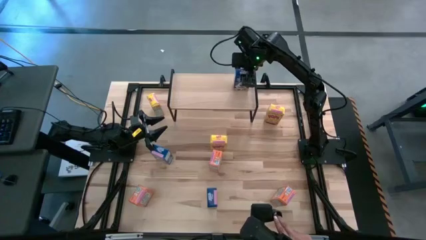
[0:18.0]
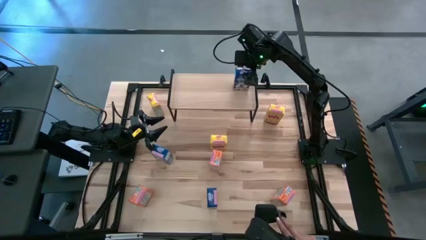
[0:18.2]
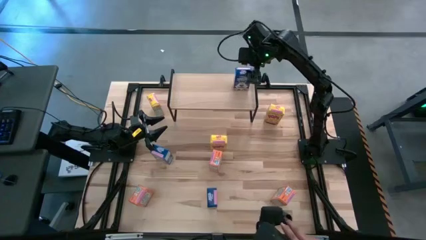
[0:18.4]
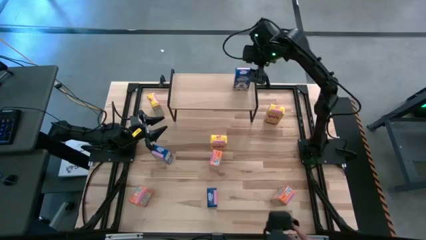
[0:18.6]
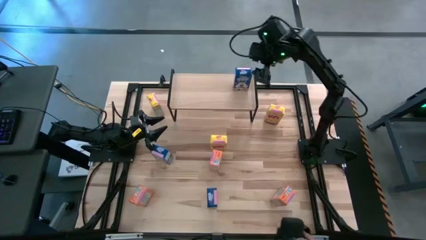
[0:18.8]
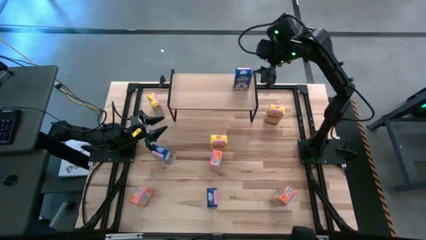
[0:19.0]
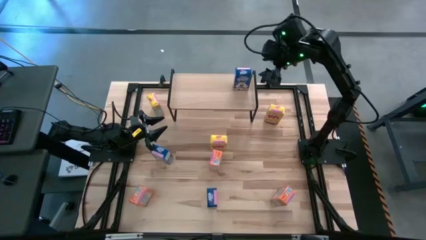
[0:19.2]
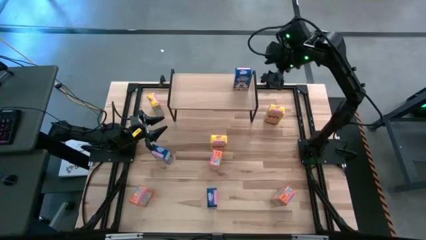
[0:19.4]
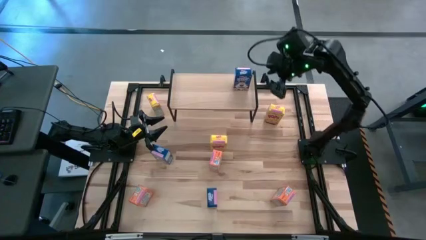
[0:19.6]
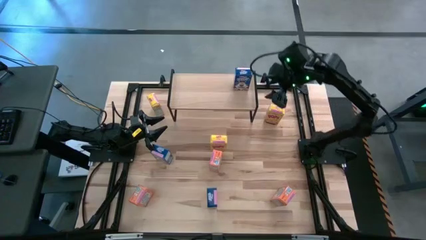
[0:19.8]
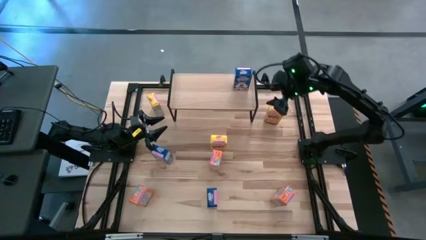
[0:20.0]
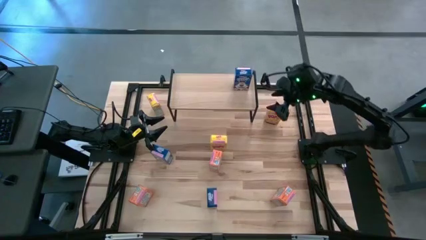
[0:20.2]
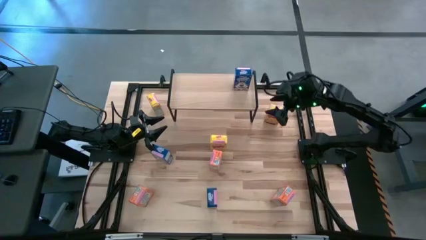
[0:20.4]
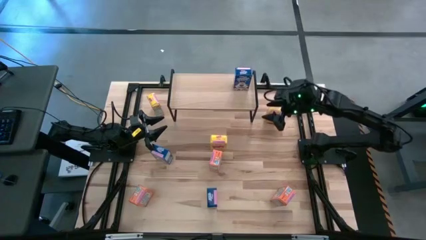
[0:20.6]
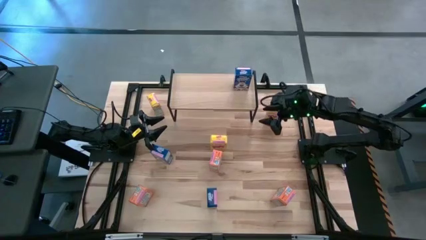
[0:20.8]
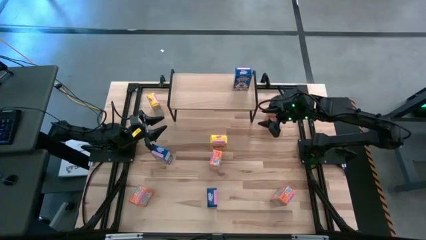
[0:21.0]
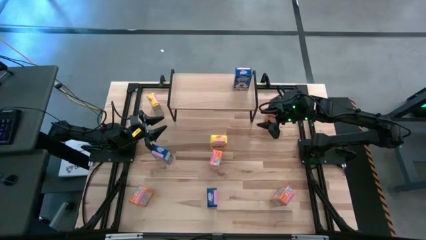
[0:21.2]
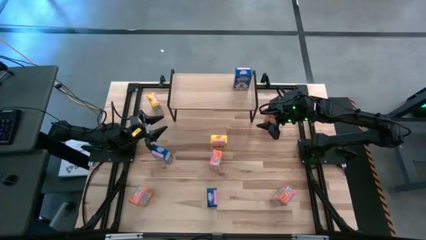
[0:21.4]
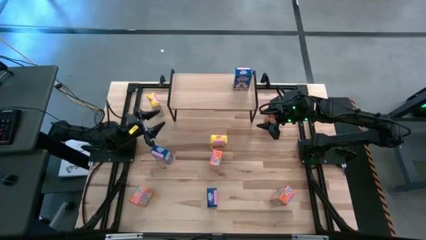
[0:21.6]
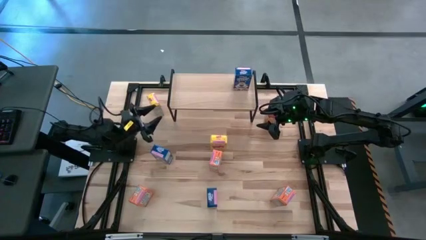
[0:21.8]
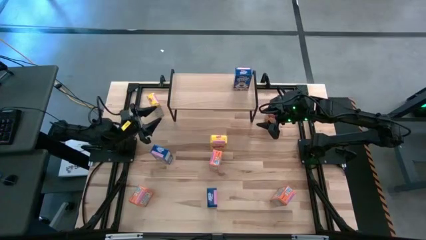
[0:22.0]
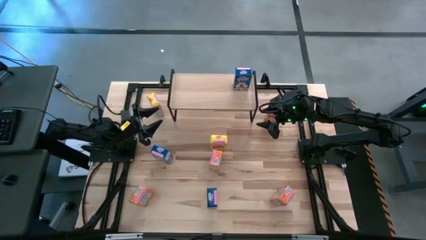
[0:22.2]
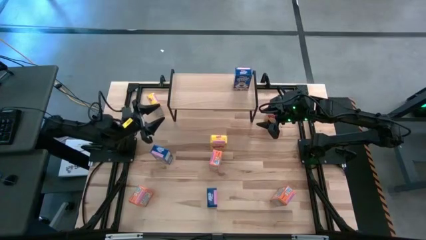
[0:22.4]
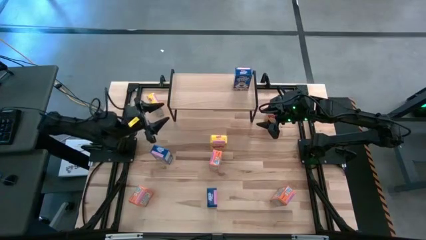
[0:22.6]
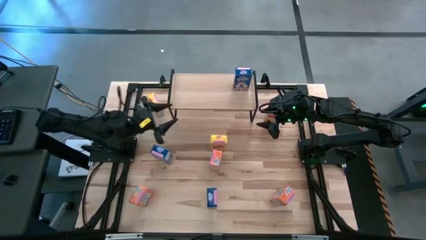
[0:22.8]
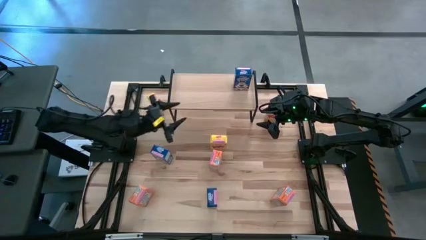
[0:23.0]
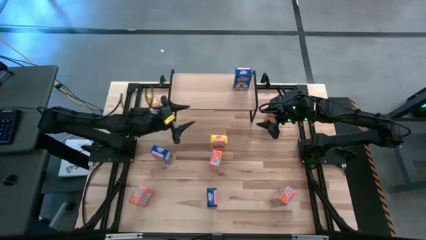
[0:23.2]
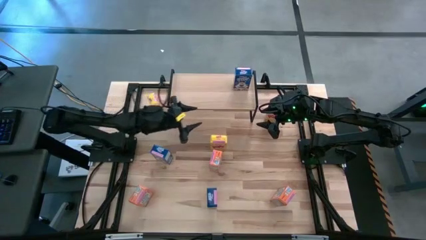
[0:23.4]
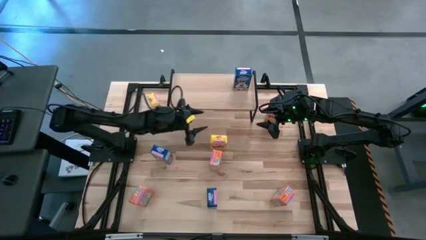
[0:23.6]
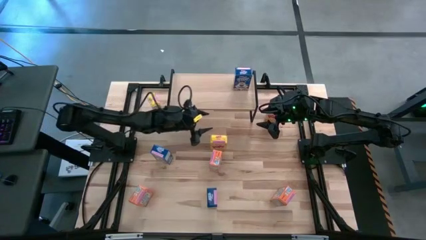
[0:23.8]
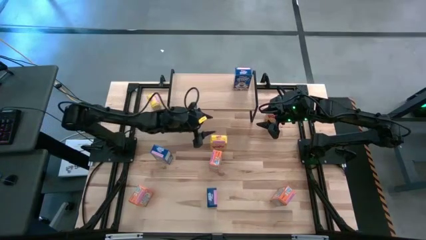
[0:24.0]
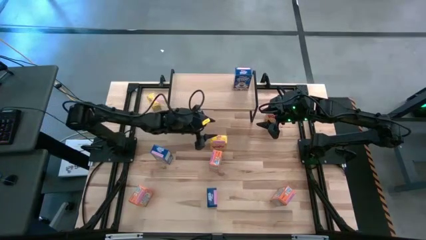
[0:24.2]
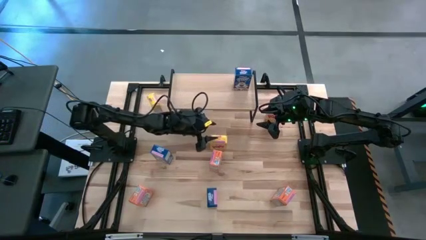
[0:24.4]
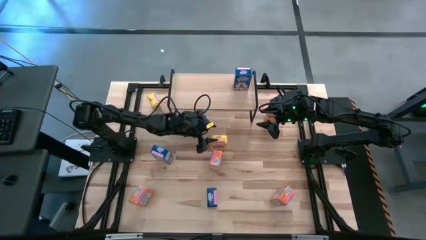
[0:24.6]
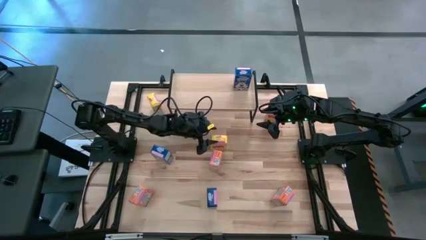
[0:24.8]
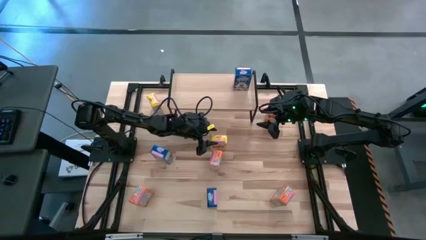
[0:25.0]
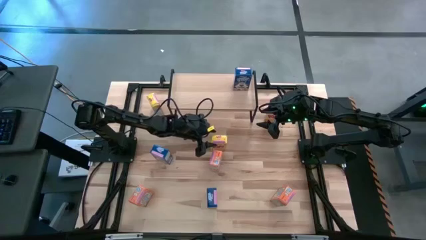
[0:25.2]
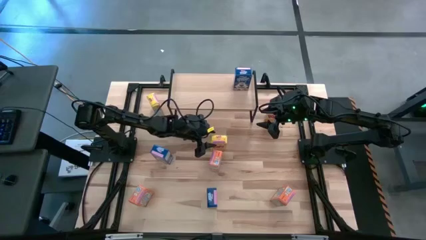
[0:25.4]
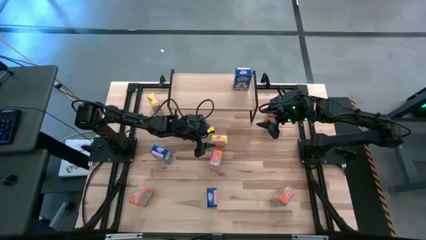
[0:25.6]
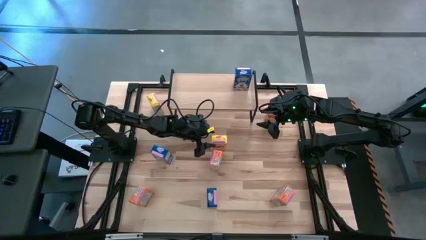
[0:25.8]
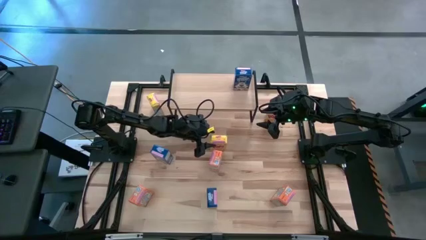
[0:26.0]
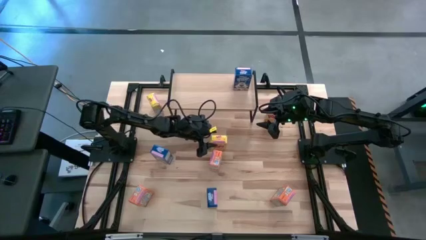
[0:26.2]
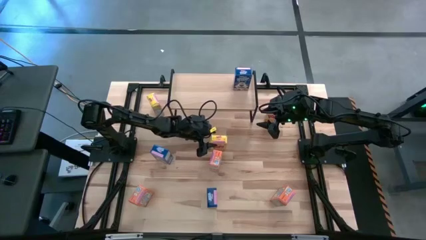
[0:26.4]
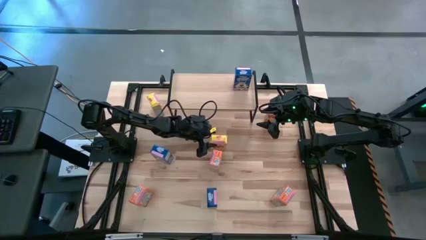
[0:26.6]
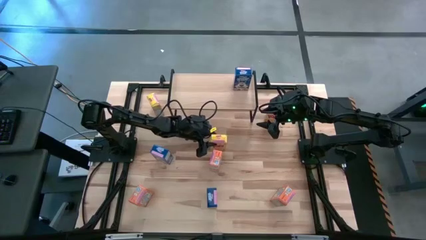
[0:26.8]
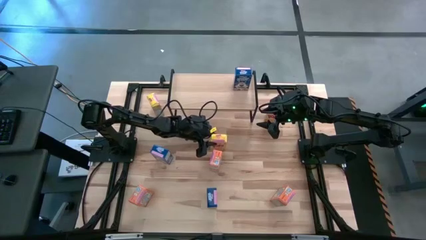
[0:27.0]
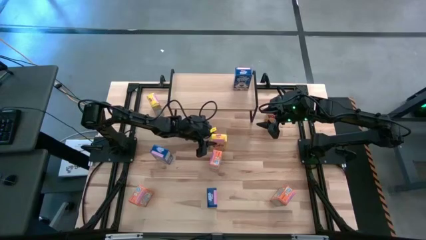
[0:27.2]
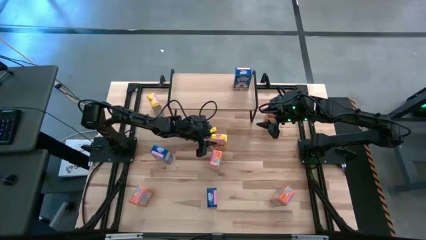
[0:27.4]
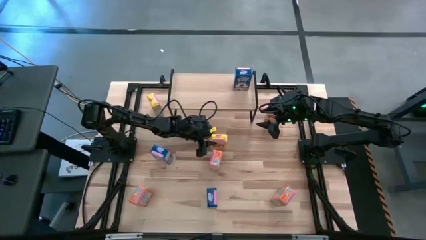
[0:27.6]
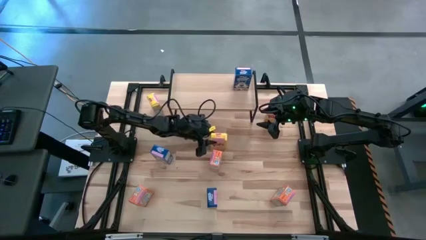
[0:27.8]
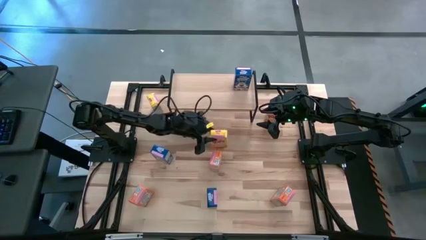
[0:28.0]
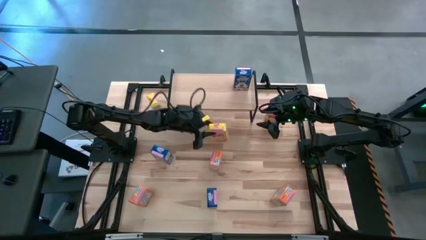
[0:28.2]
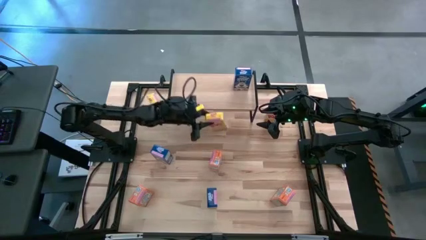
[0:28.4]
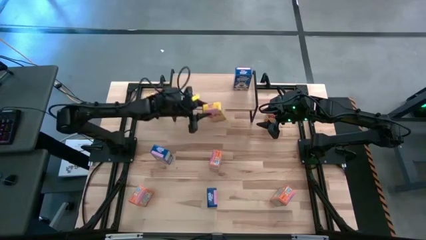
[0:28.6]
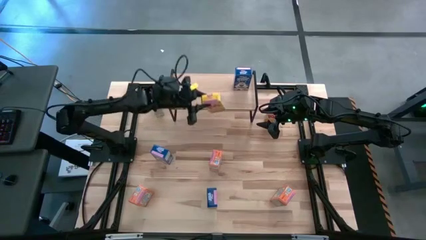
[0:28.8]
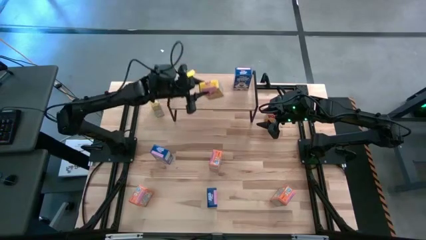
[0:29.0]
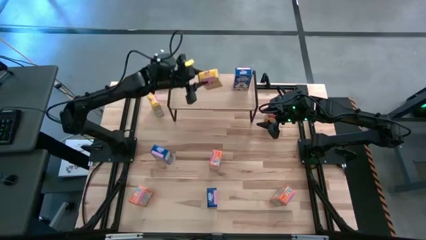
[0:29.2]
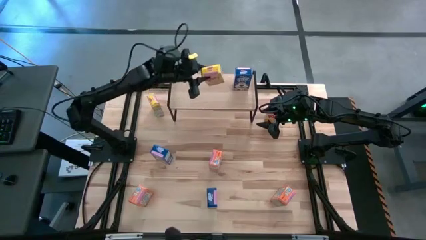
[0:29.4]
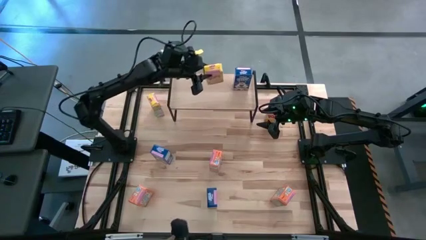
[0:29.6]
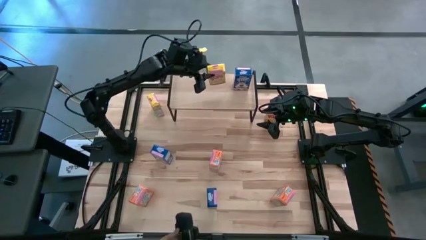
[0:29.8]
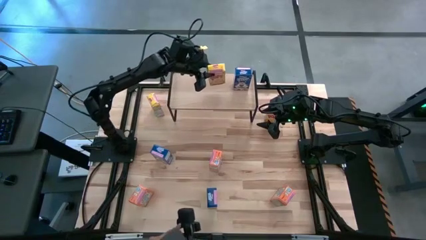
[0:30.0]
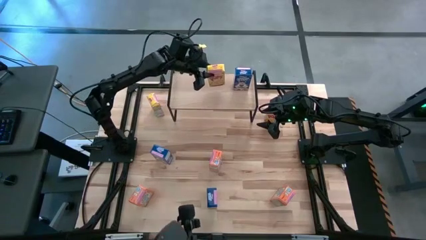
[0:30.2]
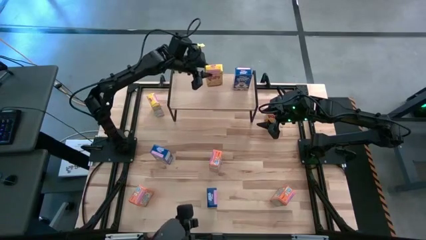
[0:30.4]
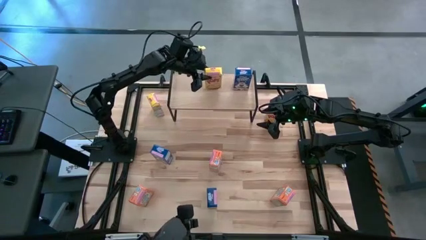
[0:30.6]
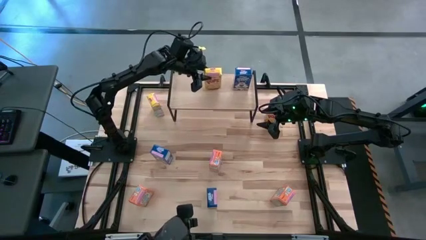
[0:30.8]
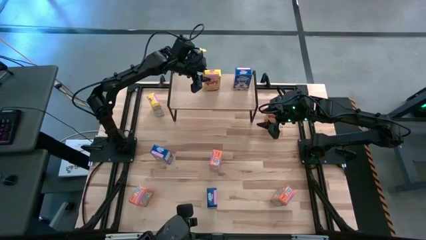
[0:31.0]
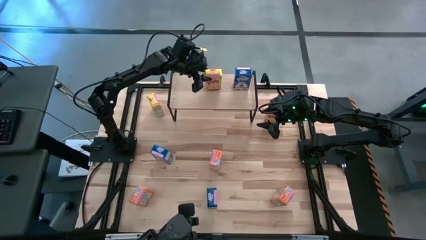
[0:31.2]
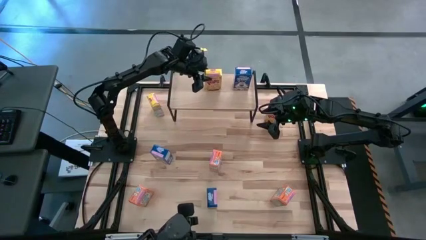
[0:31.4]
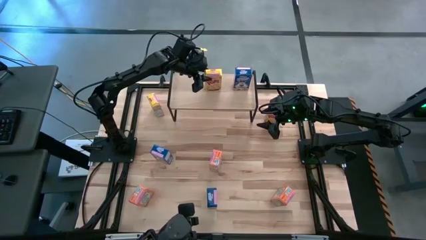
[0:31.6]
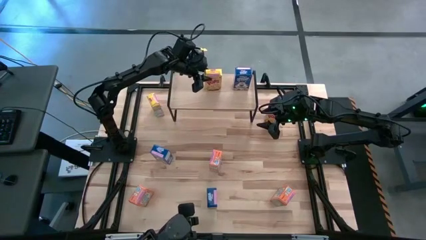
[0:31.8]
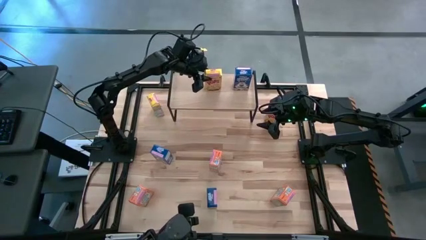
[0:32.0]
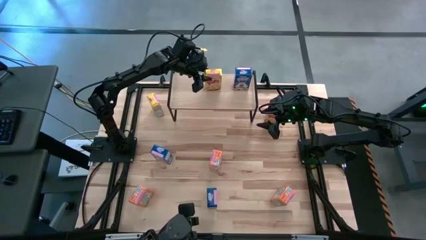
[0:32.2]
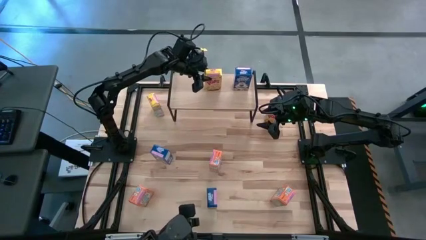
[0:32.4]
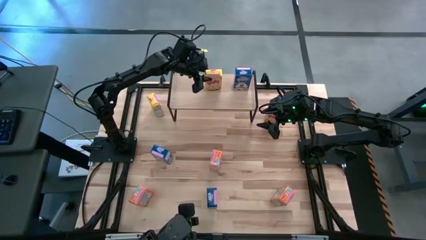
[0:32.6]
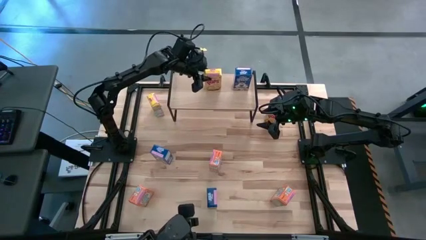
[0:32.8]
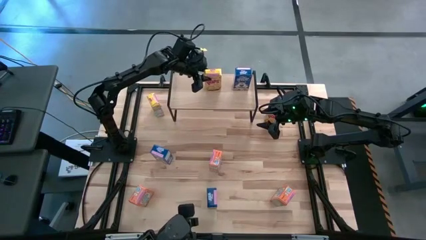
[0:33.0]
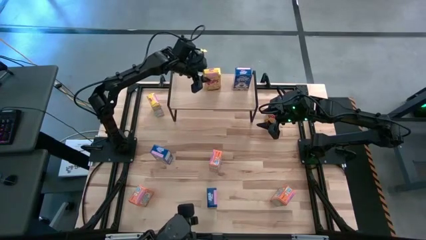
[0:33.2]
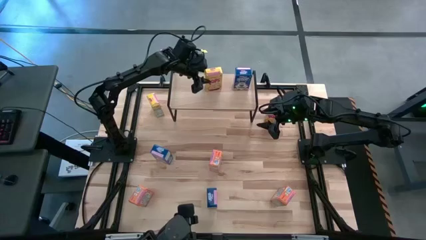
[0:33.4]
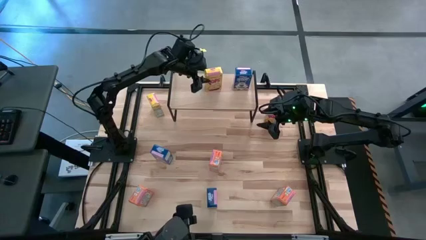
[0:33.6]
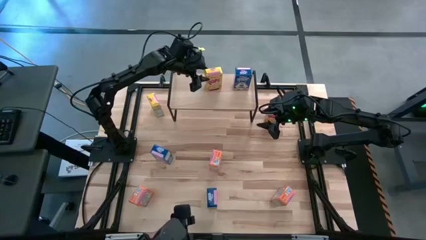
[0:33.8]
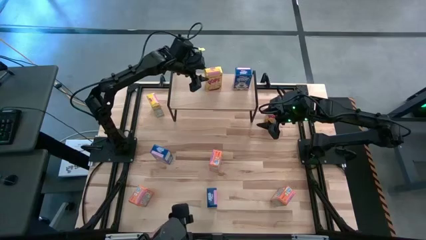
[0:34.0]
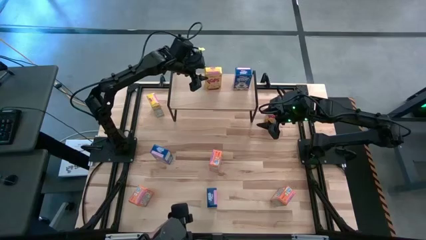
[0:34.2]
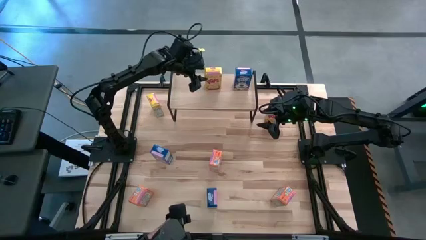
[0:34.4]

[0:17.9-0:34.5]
Task: Stack cereal on shelf
Put the bottom yellow cereal box on the shelf
